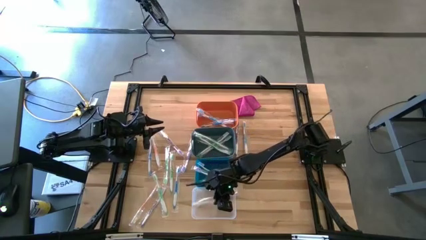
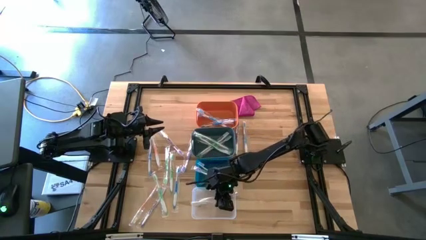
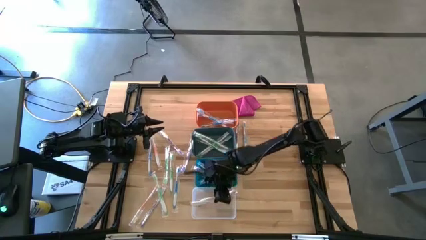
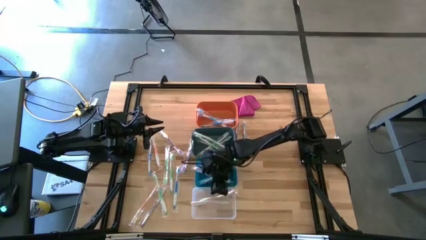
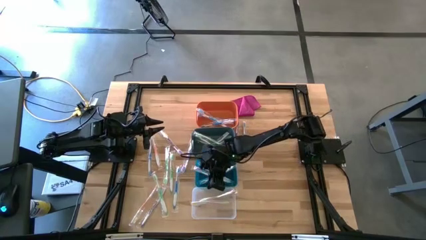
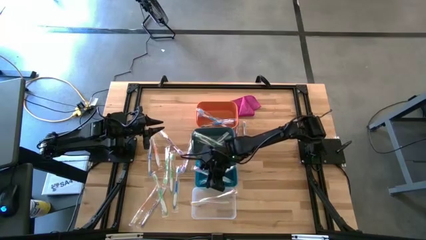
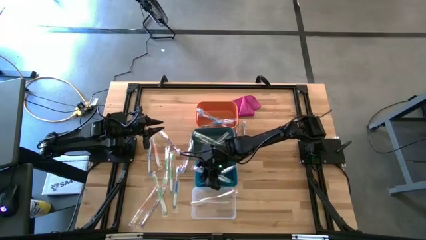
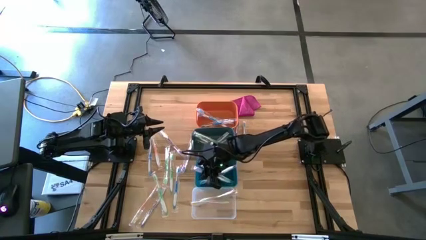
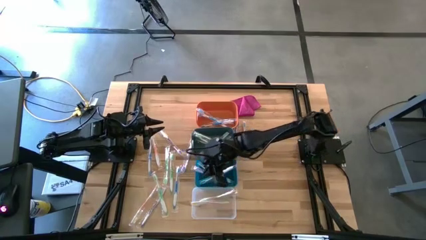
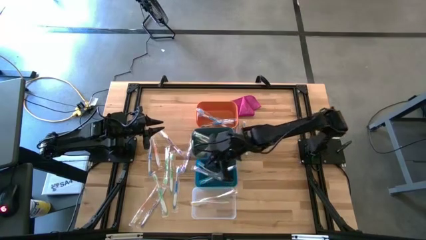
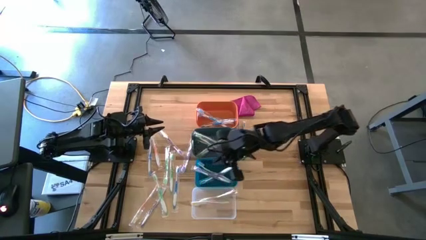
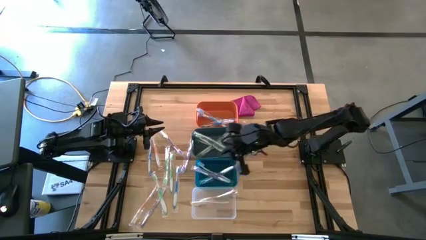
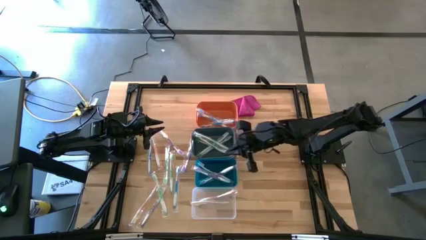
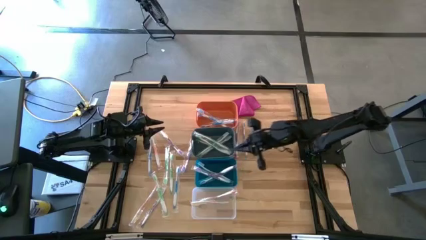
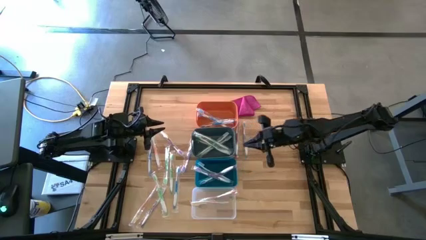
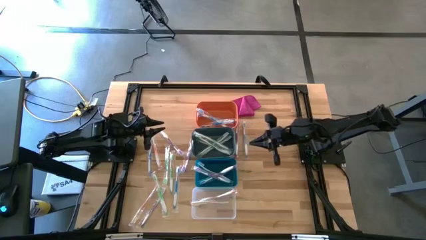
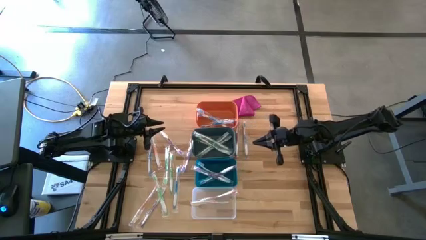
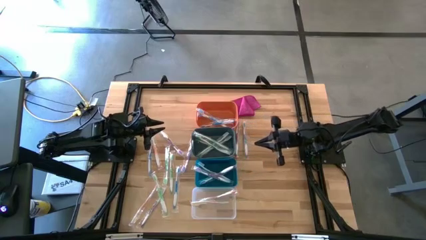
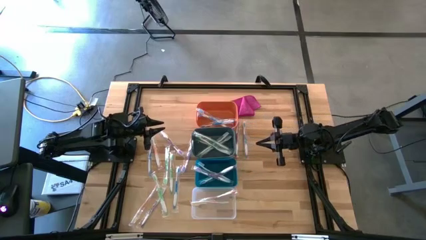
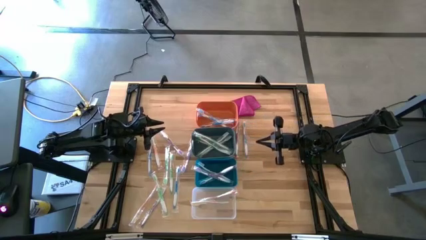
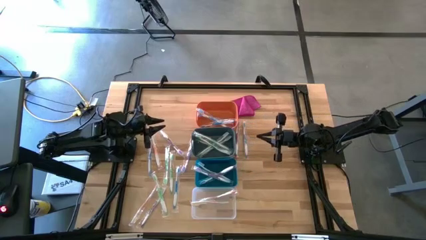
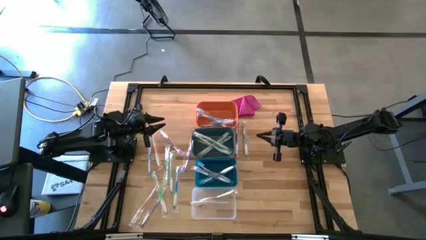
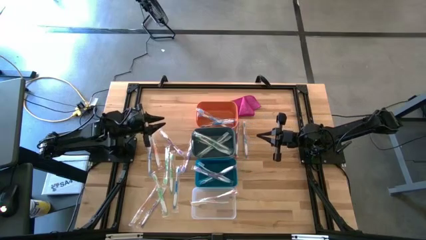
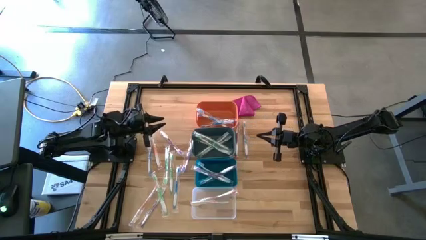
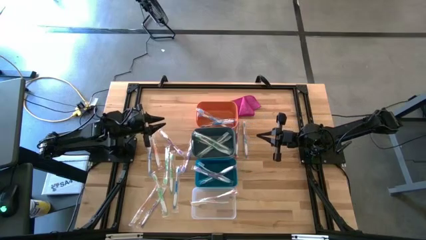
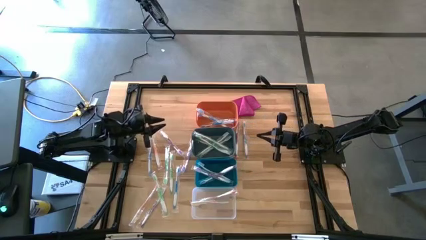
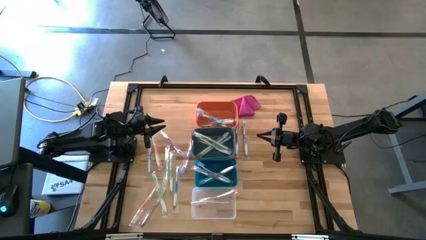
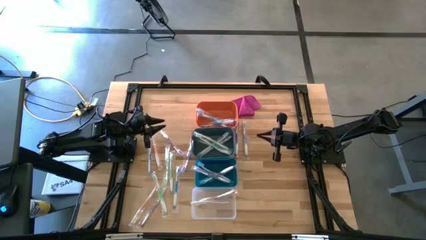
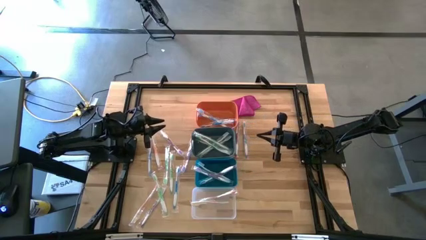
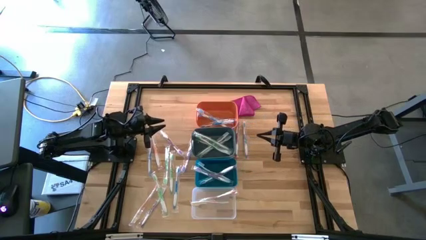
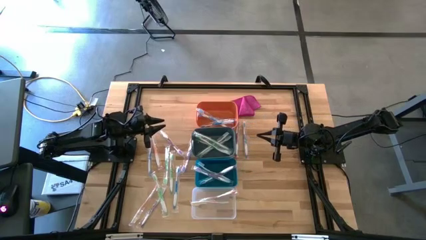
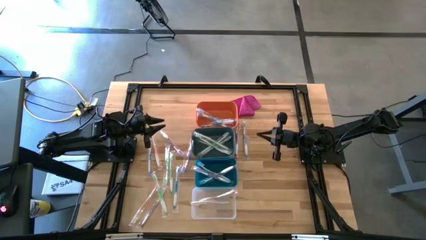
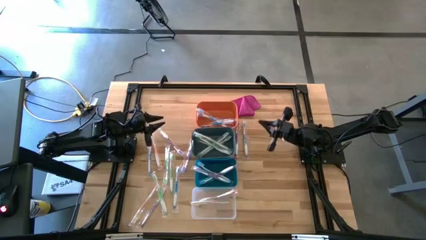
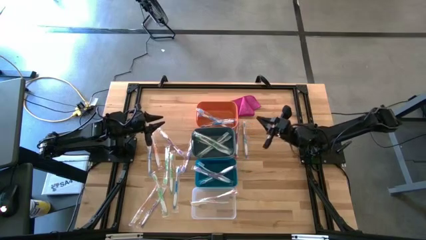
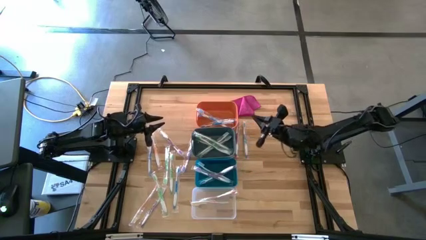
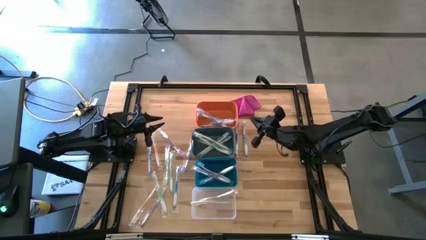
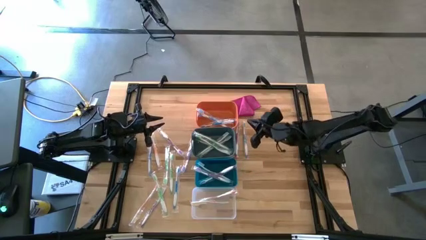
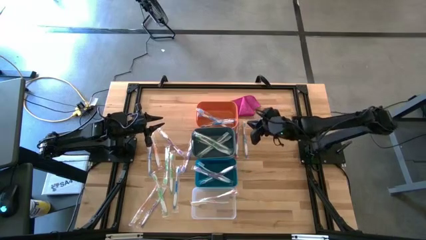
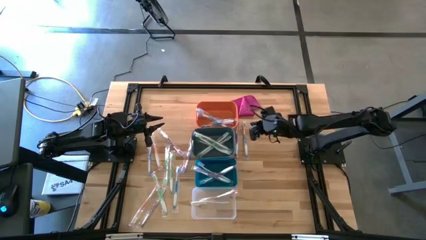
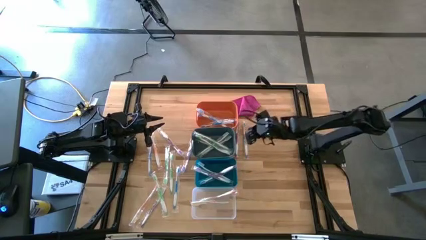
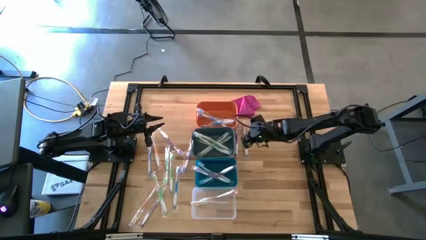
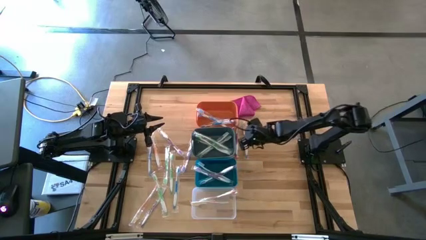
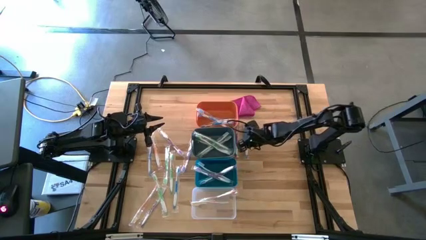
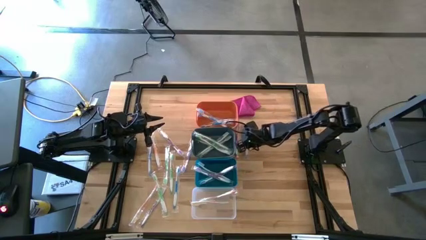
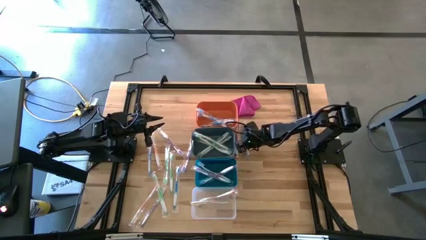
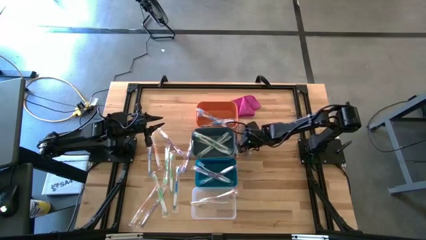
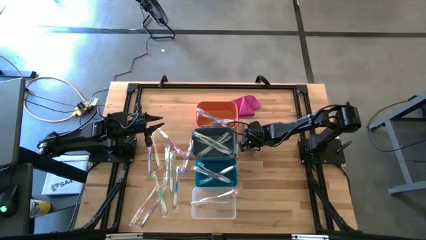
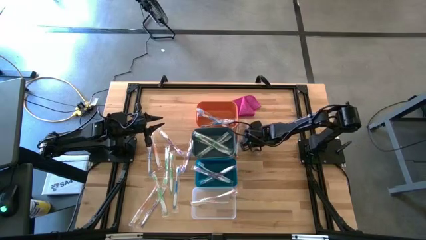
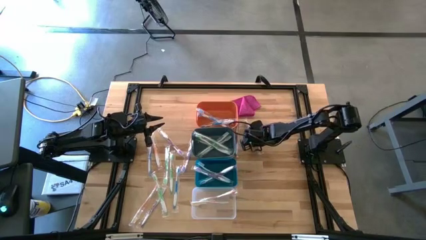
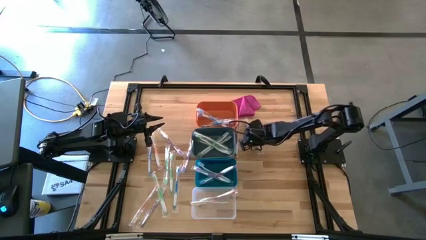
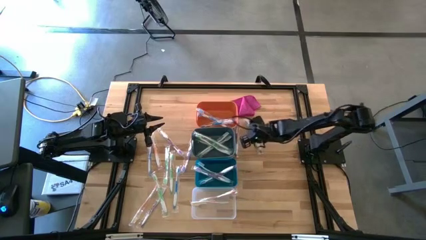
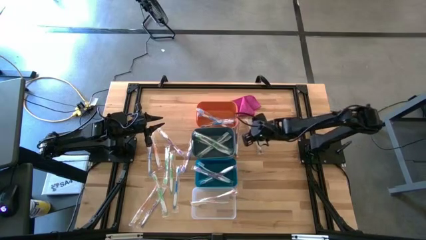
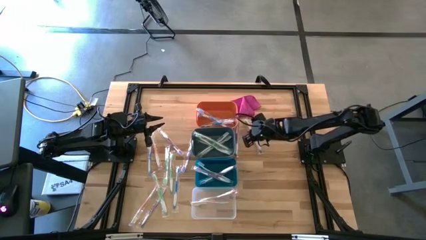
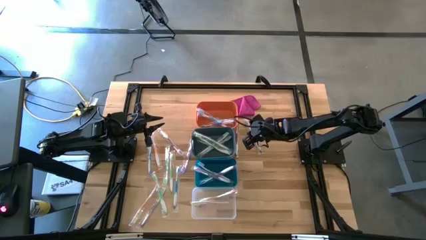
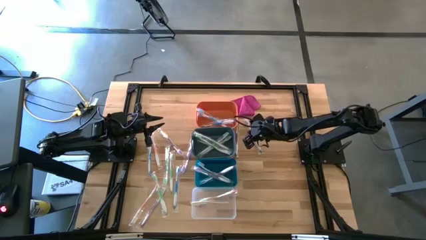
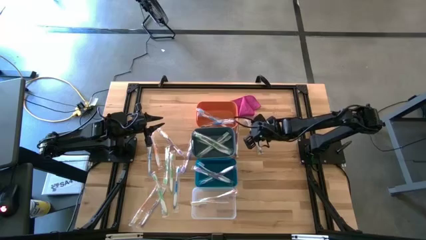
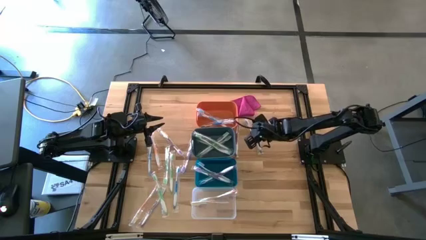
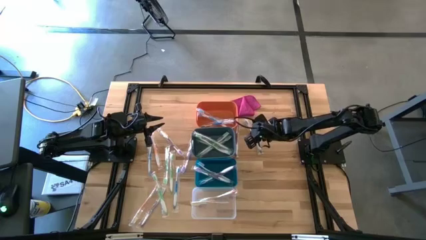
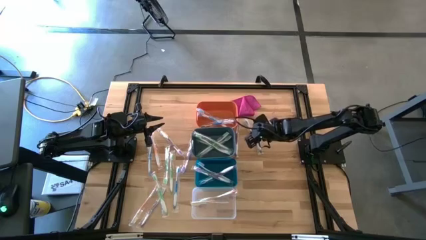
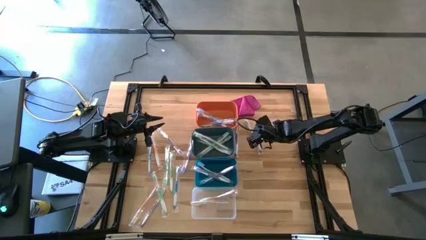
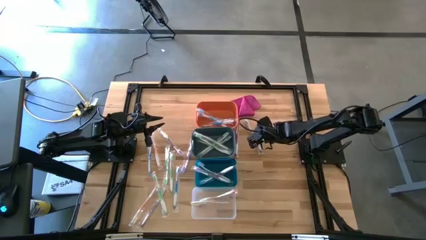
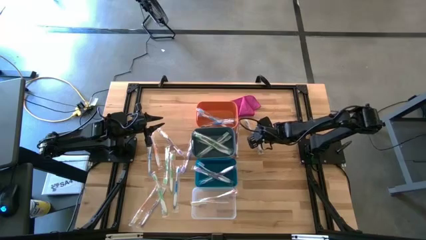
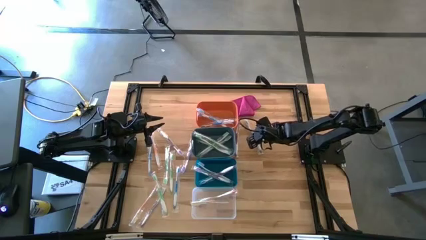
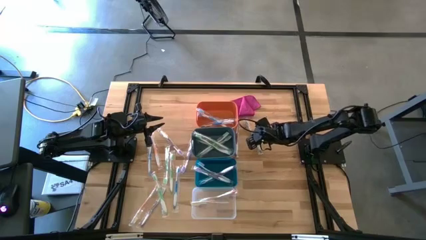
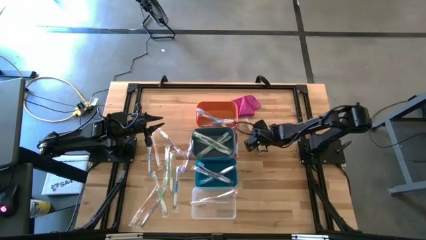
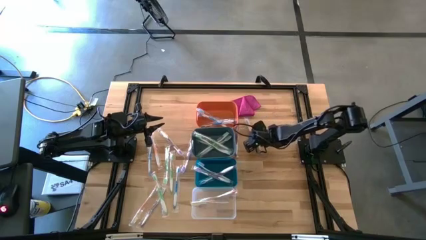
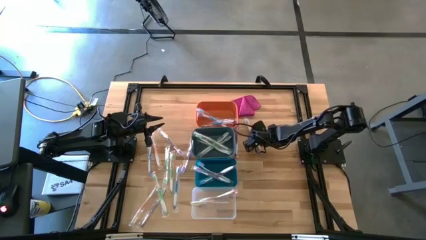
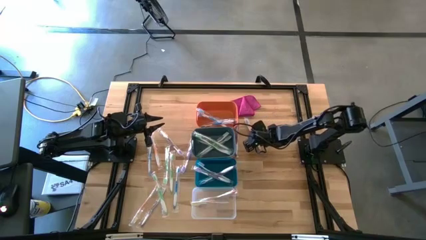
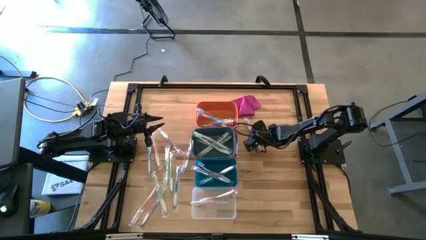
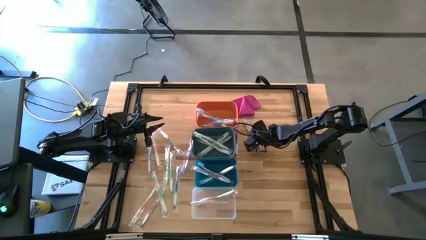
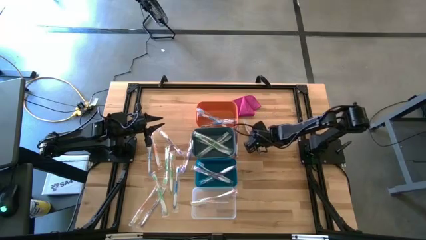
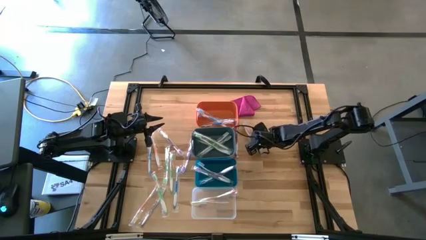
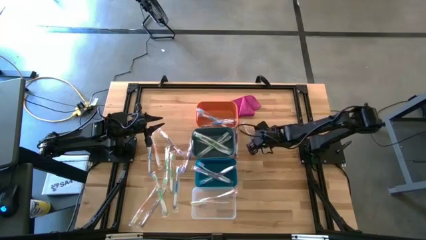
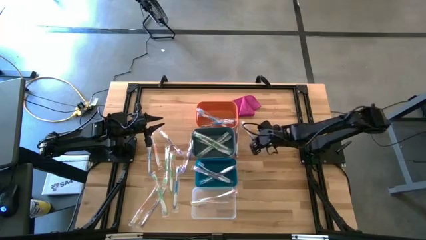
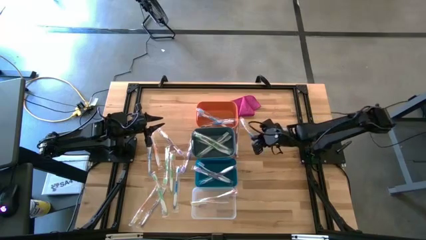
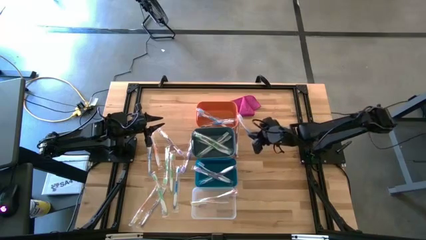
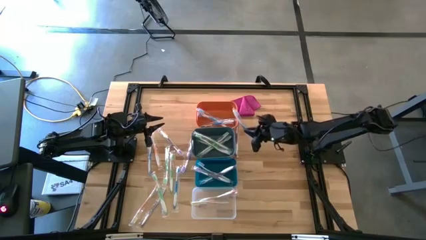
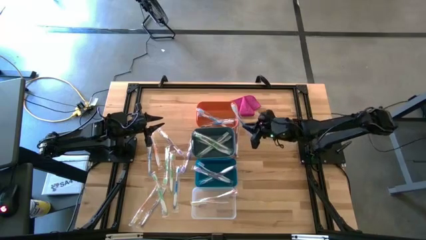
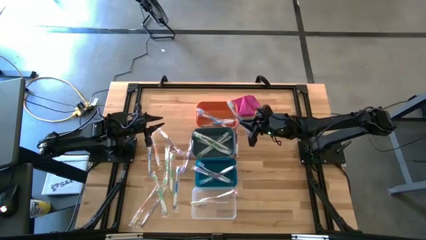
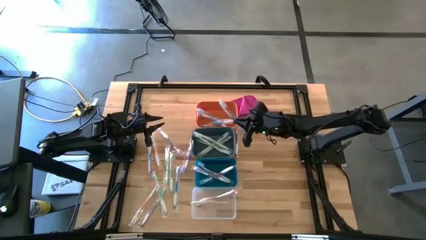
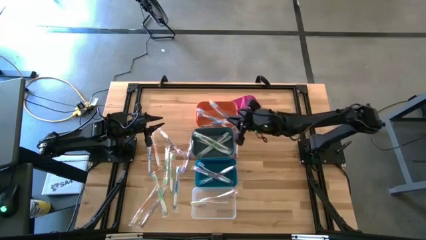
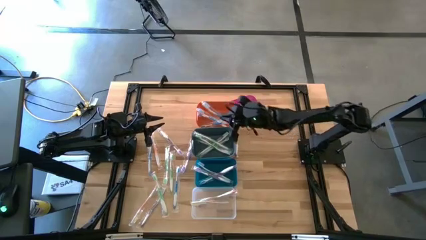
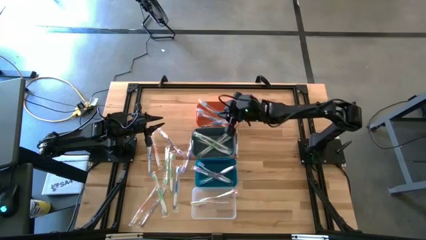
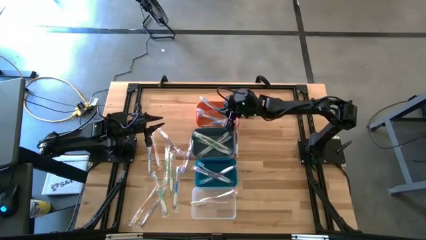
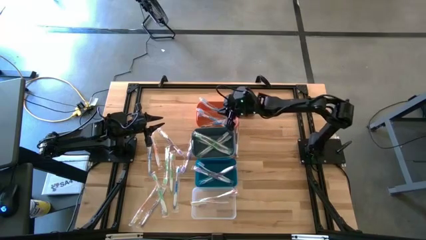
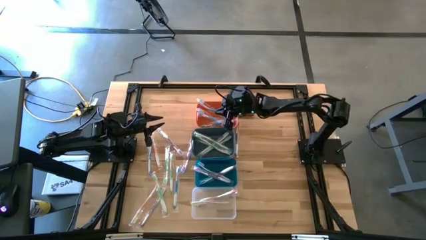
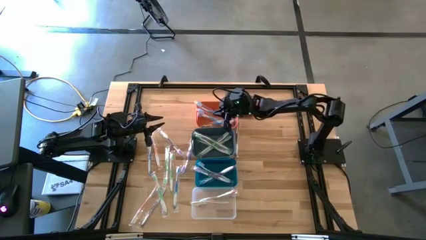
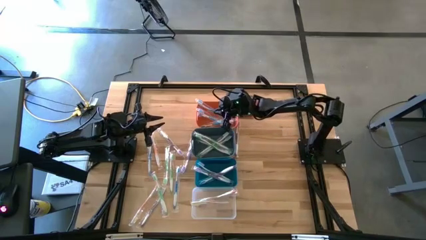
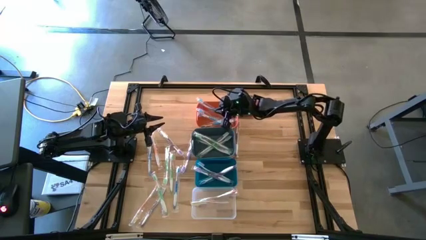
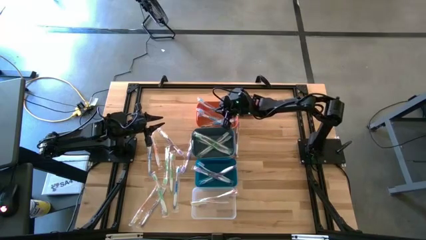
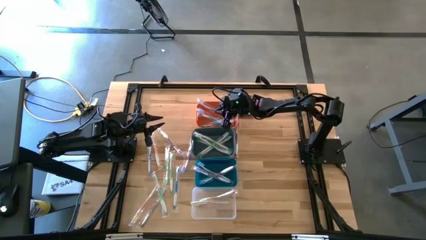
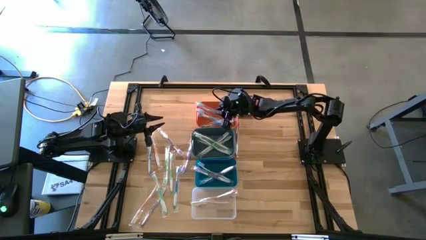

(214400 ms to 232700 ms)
Task: Pick & Place Toothbrushes
Put the blue toothbrush into the orange bin
